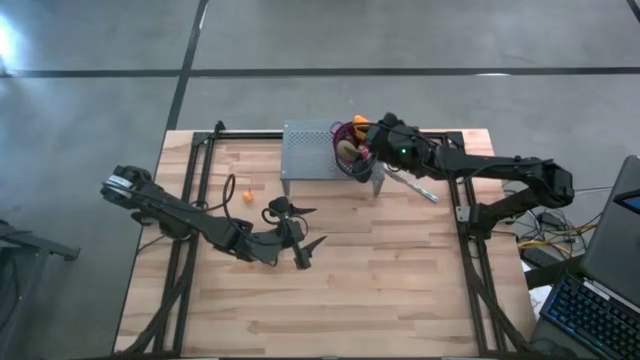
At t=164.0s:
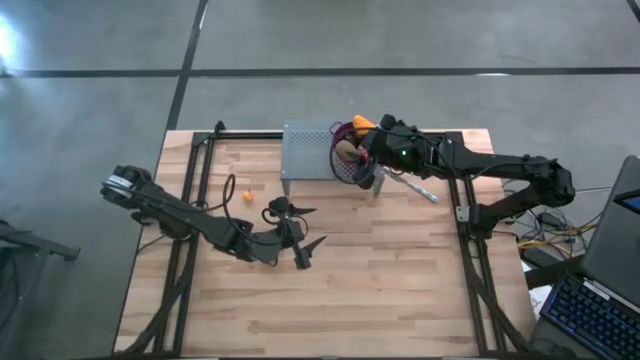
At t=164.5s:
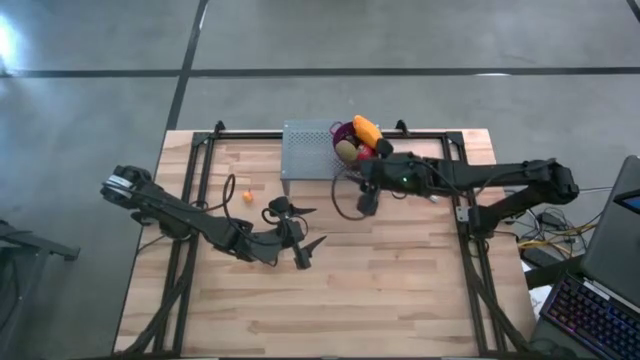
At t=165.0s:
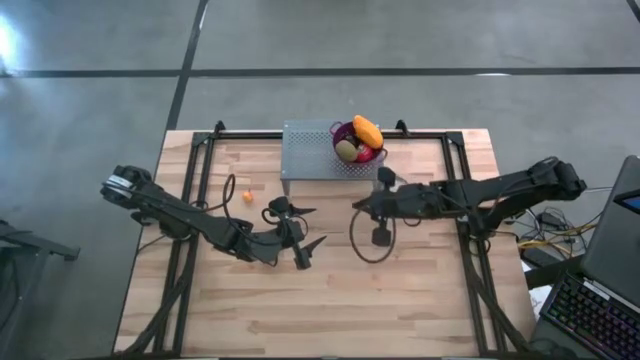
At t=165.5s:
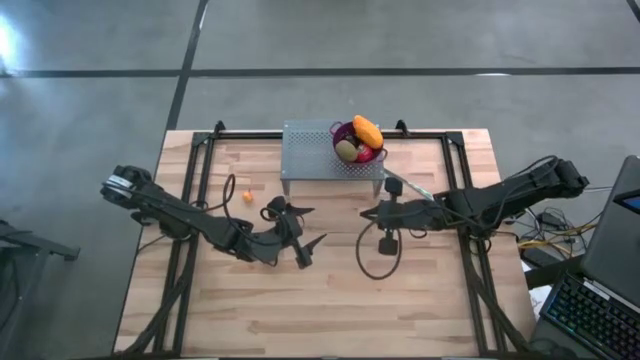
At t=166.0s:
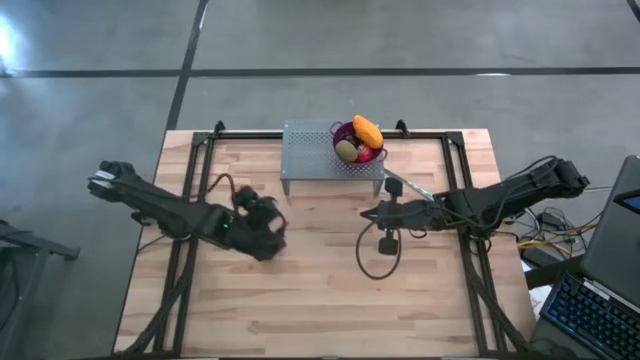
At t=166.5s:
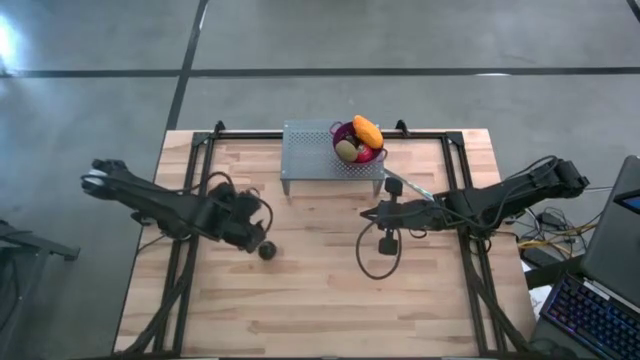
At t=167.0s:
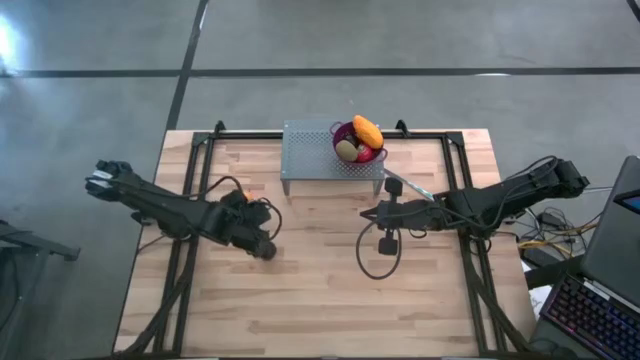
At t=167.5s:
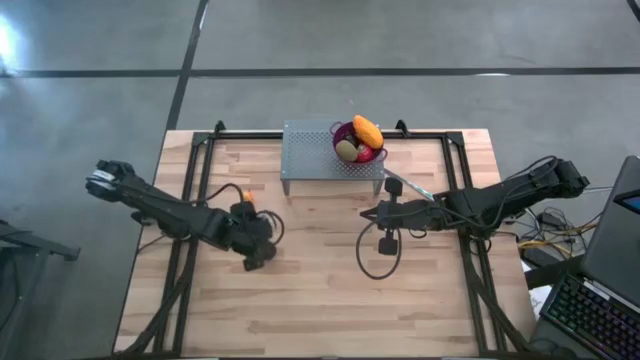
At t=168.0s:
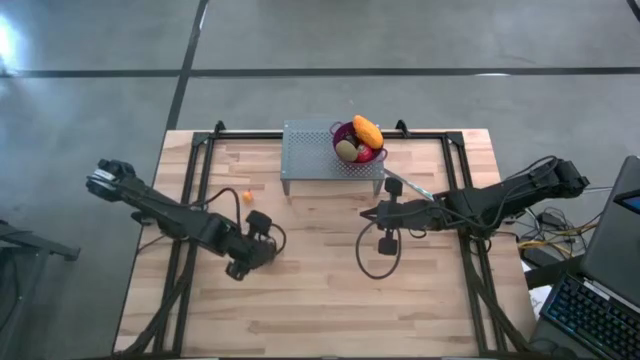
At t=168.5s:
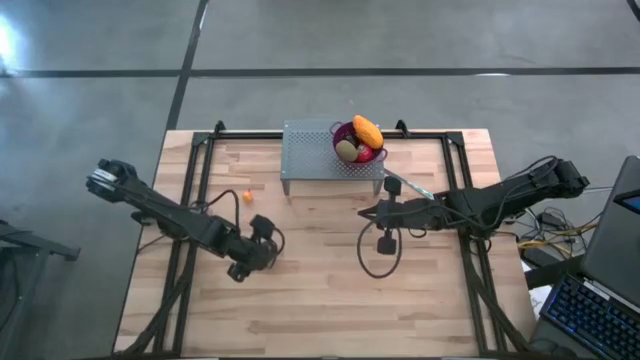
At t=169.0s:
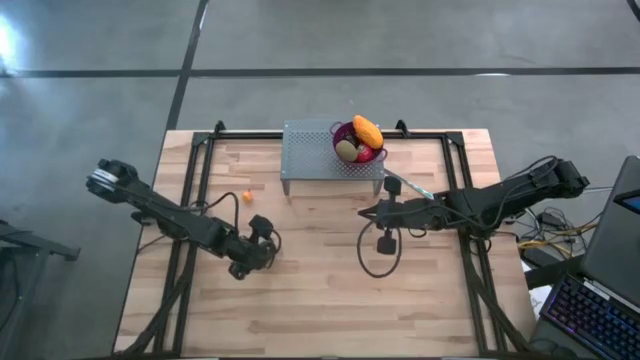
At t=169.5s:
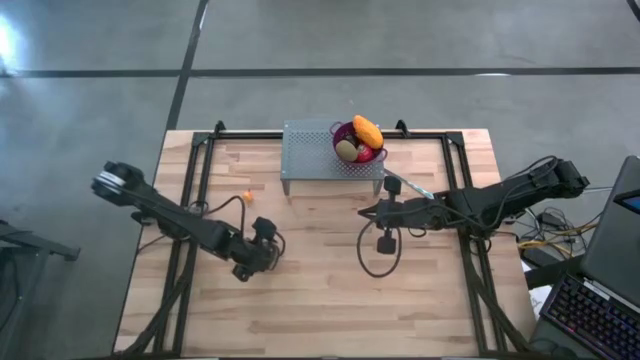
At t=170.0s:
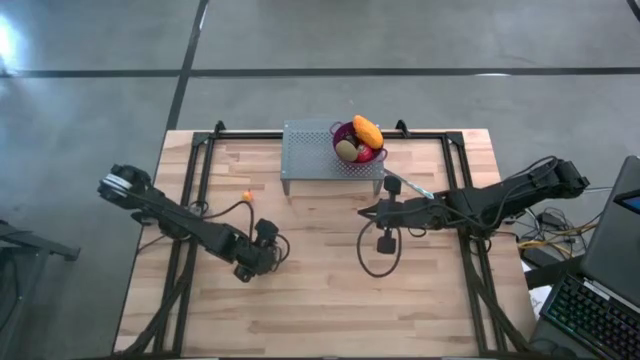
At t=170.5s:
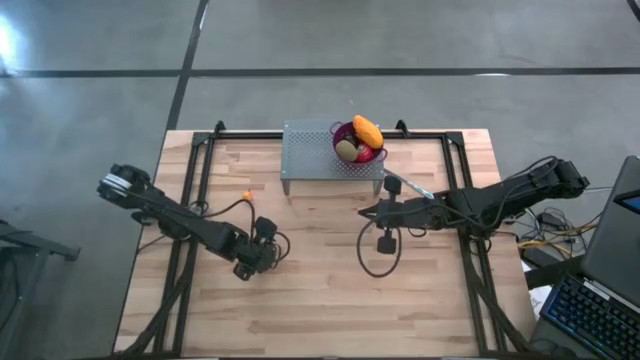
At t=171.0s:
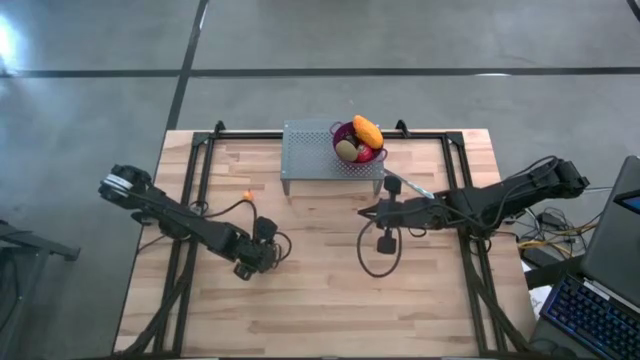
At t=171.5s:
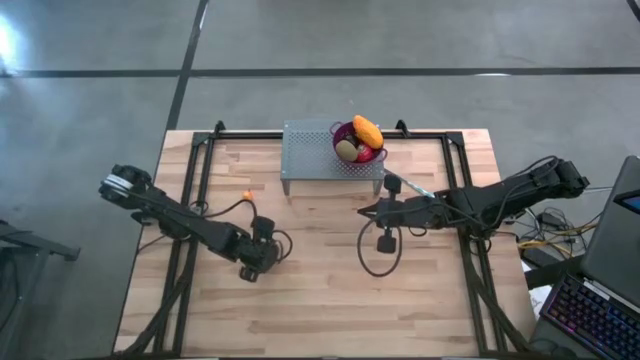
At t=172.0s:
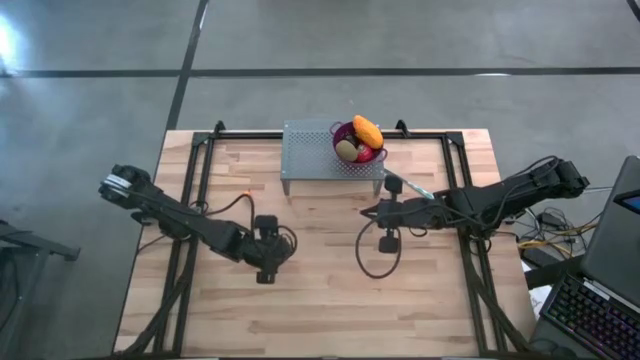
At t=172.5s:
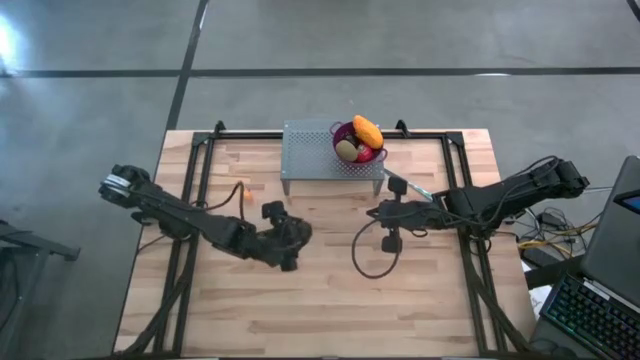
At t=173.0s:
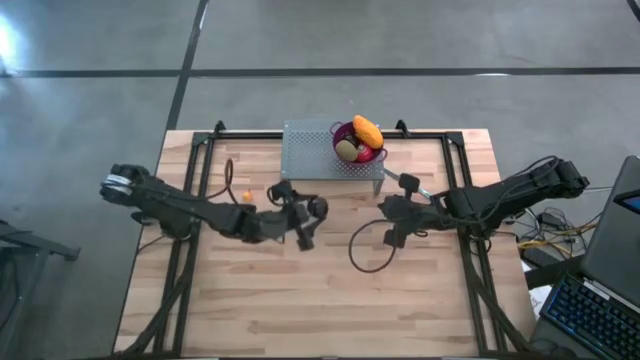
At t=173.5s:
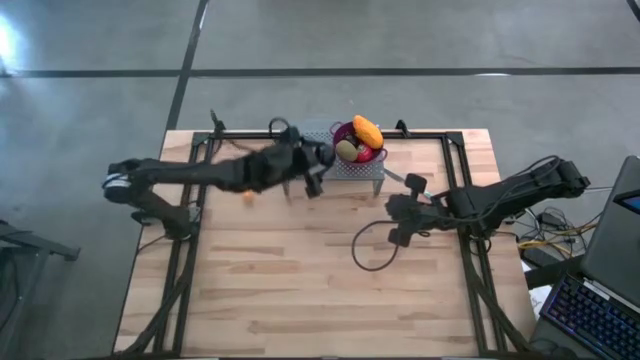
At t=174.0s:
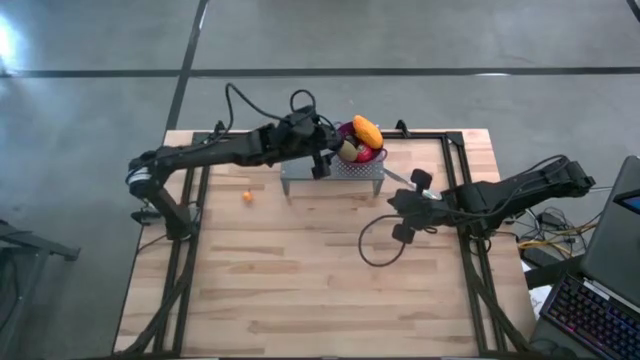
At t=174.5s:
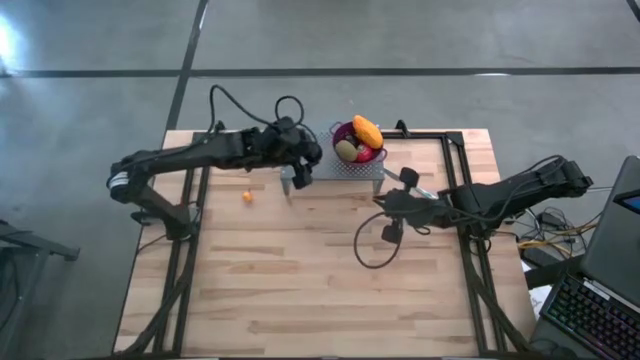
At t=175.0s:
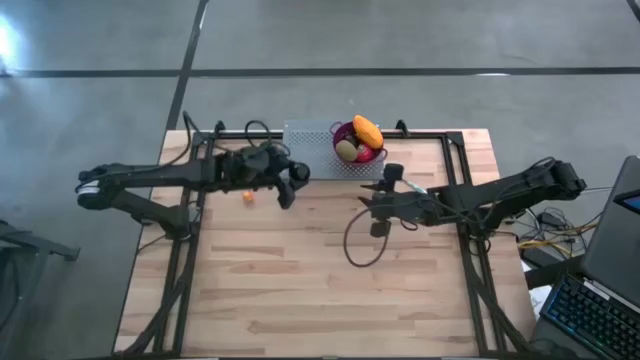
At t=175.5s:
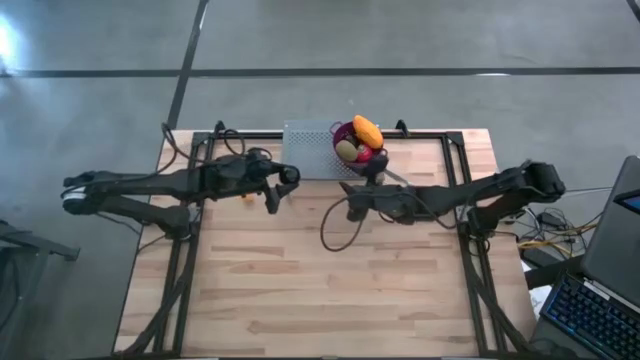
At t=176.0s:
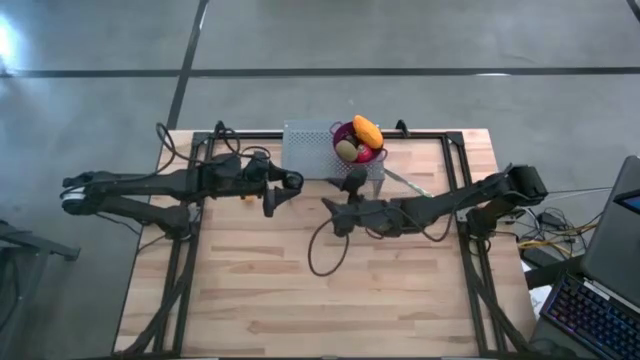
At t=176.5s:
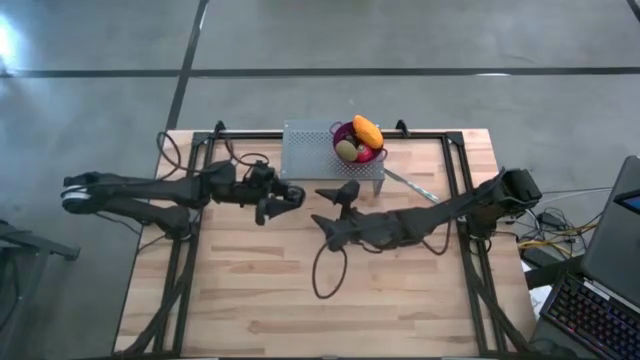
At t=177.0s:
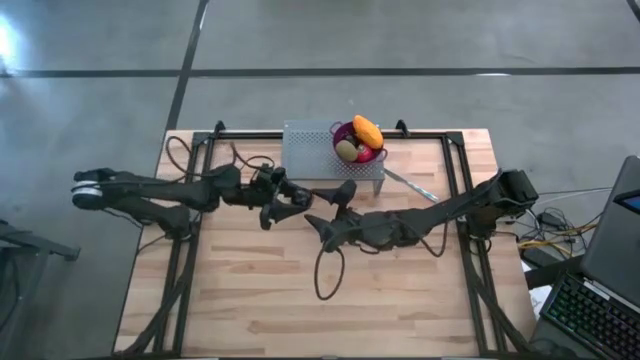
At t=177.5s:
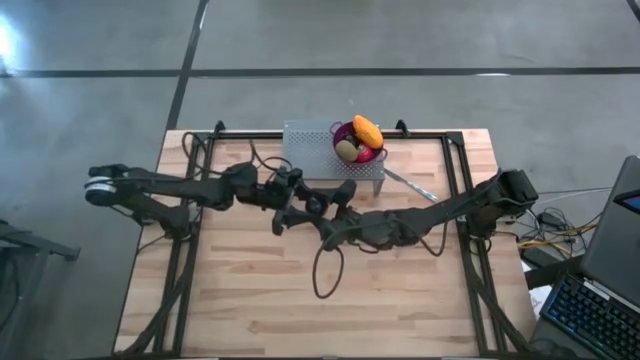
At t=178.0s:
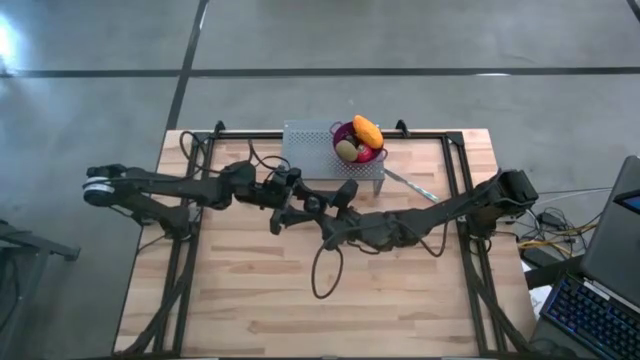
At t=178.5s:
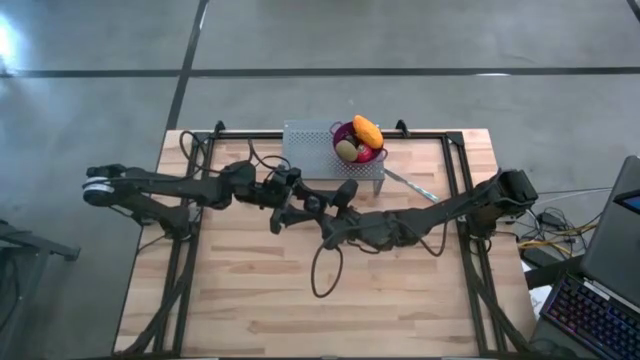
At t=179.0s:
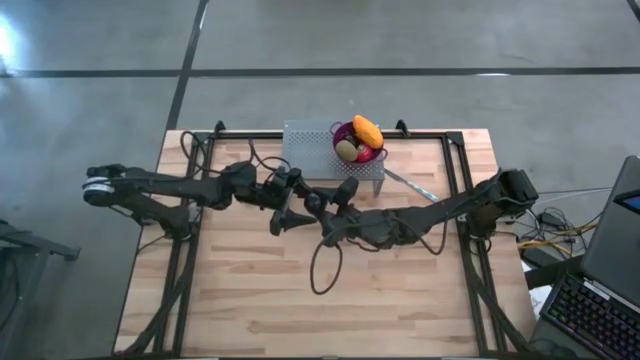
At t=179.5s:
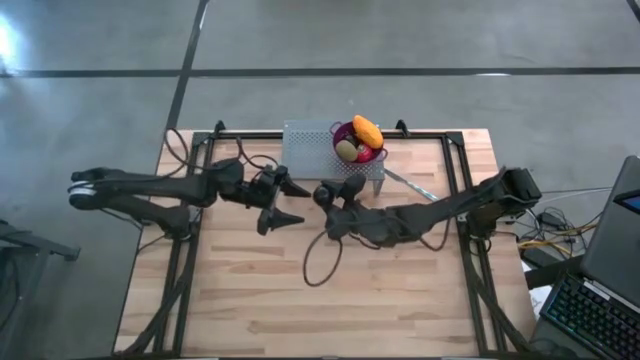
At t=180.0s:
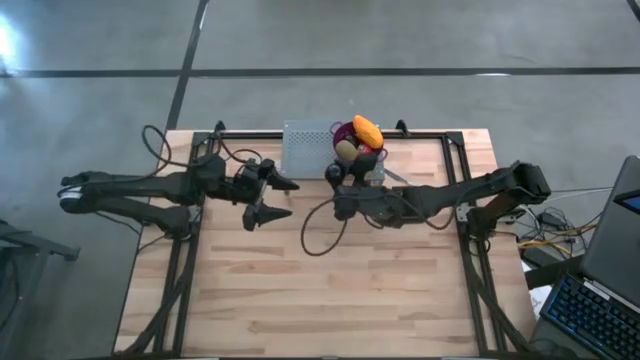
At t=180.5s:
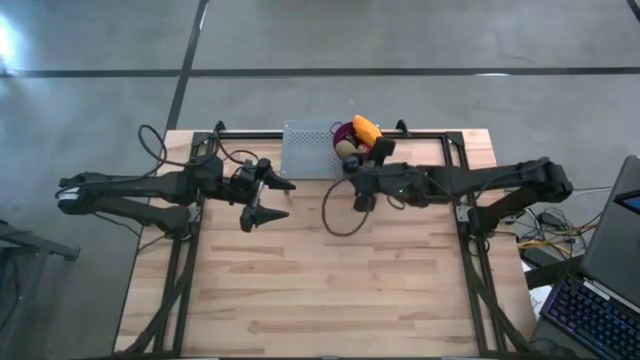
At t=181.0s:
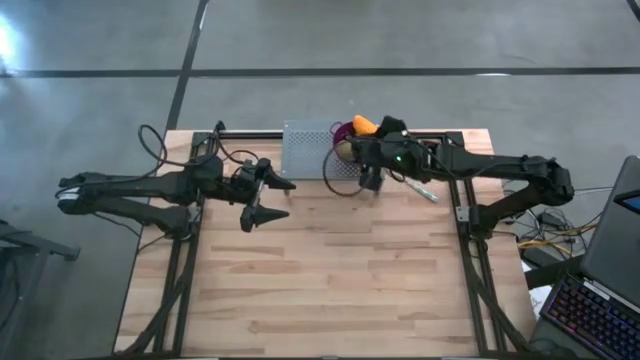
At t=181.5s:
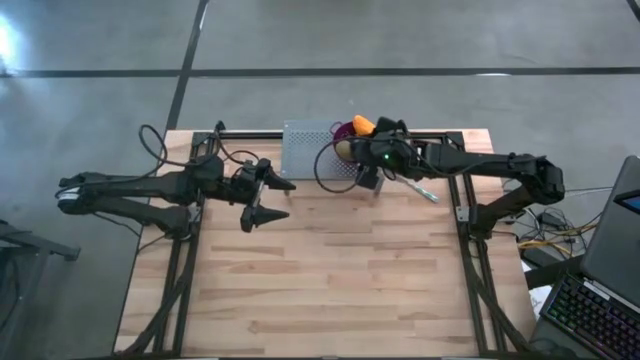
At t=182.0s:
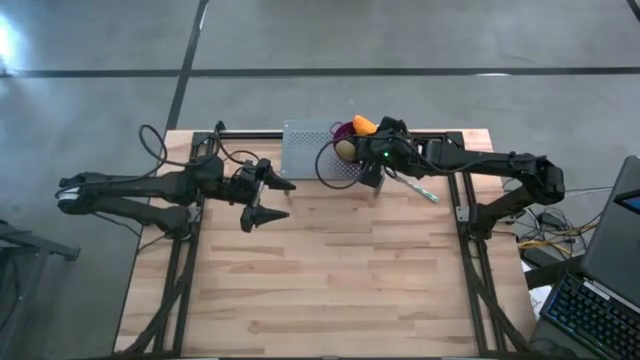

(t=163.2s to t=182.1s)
Task: Pick & Place Fruit
Put the plum into the purple strainer bowl on the shelf

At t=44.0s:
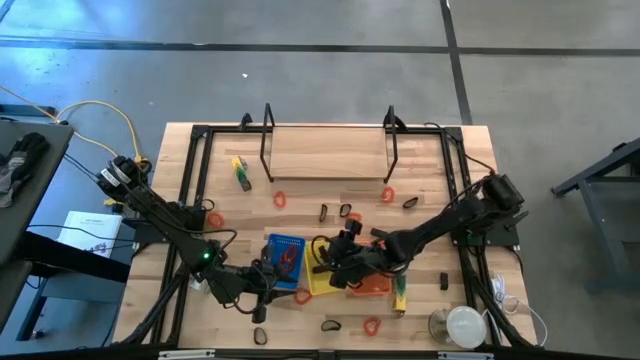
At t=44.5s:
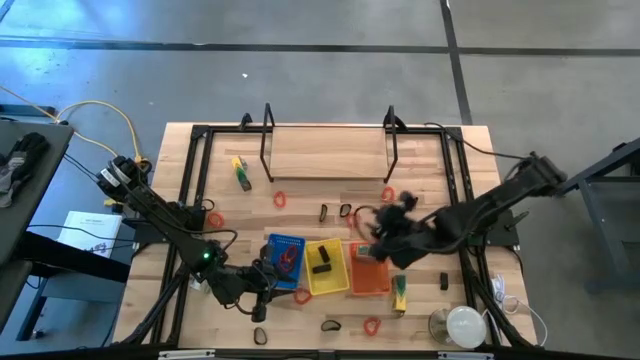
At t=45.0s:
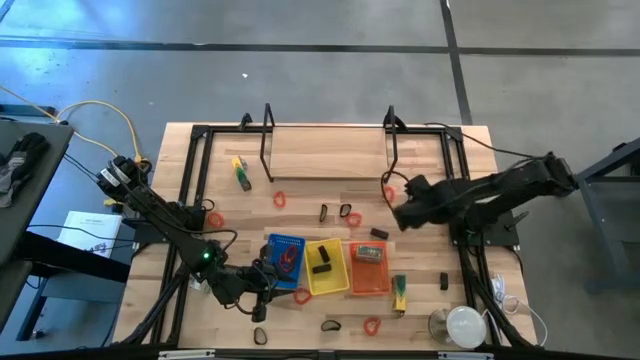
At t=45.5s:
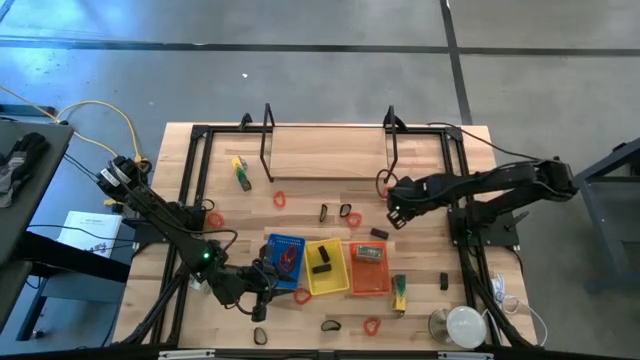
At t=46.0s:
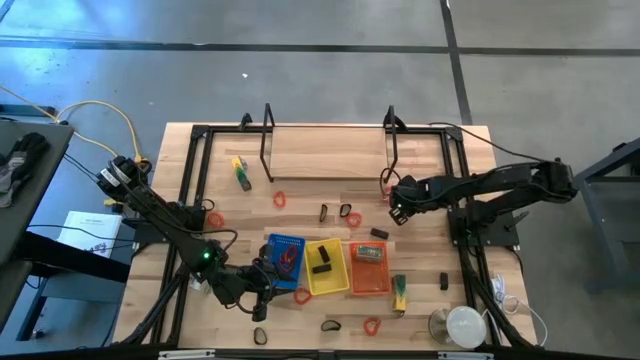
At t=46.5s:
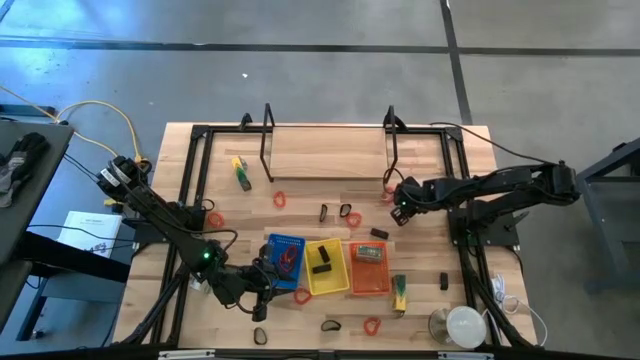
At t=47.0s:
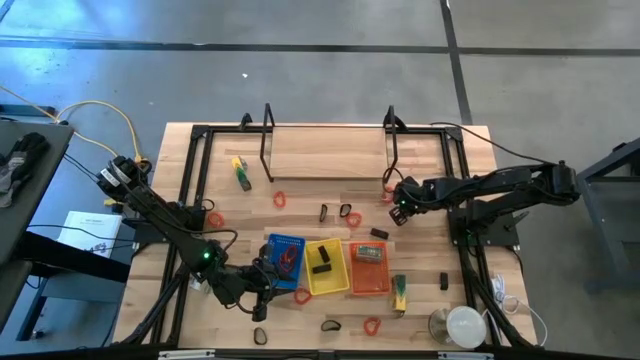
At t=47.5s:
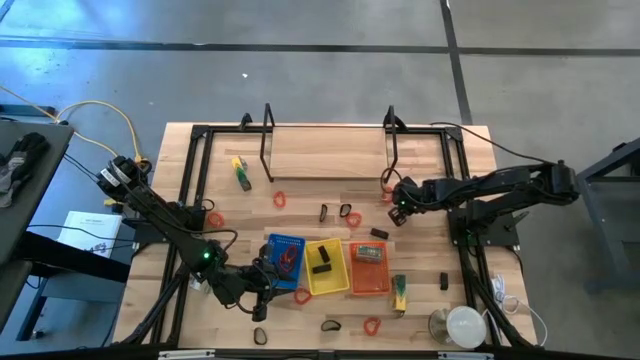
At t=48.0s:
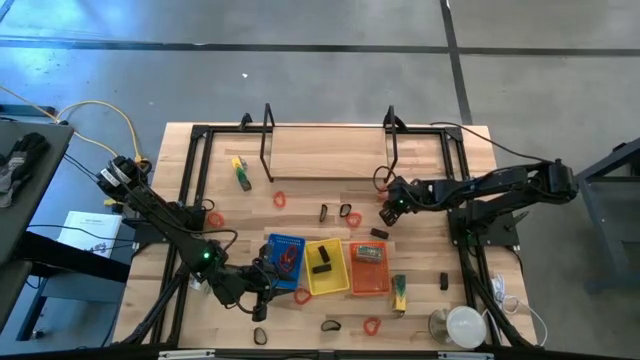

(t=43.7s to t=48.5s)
Task: Pick & Place Office Desk Supplies
Put the black rubber band into the yellow basket
